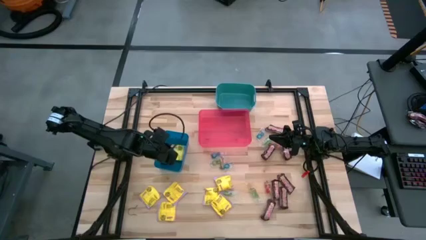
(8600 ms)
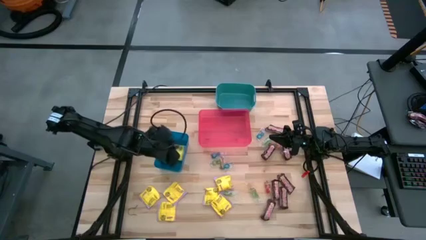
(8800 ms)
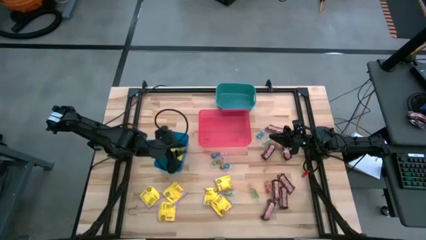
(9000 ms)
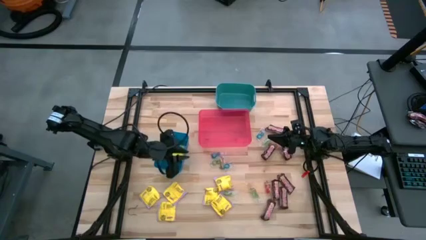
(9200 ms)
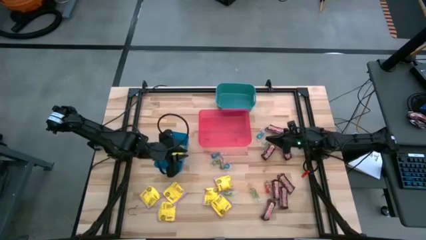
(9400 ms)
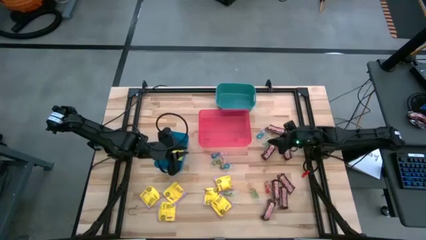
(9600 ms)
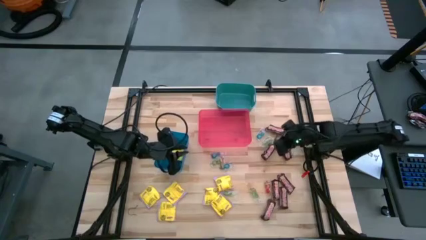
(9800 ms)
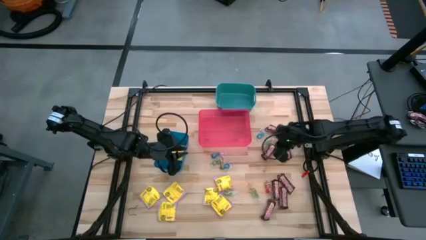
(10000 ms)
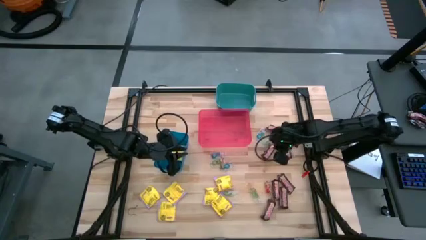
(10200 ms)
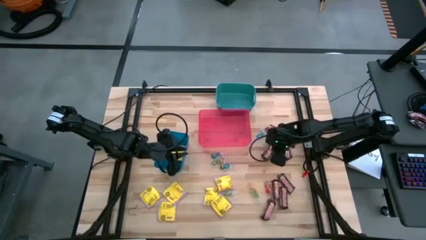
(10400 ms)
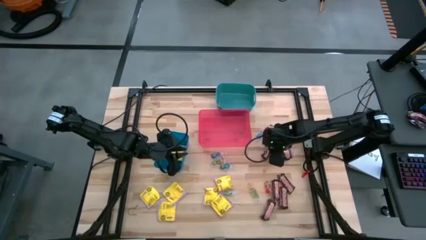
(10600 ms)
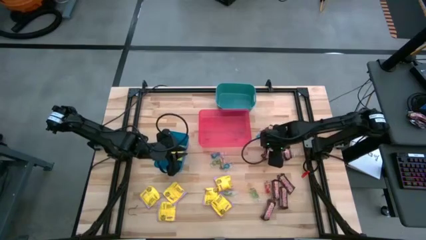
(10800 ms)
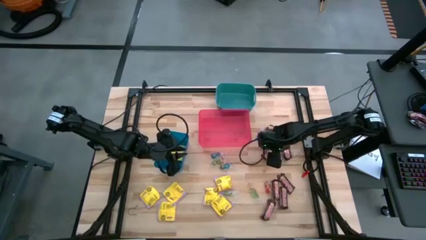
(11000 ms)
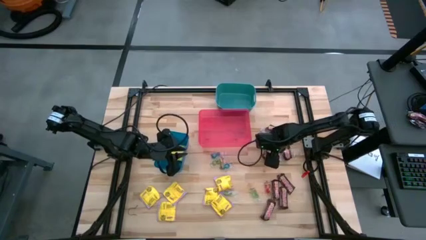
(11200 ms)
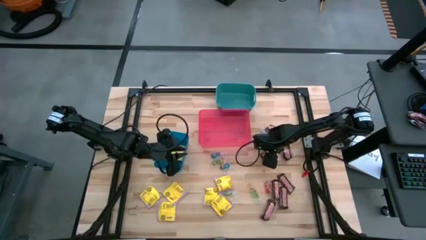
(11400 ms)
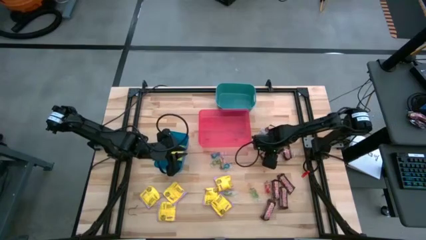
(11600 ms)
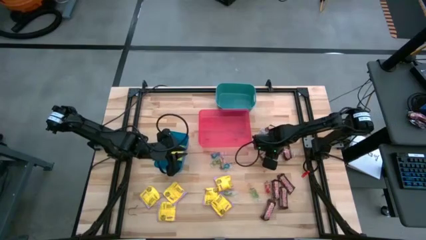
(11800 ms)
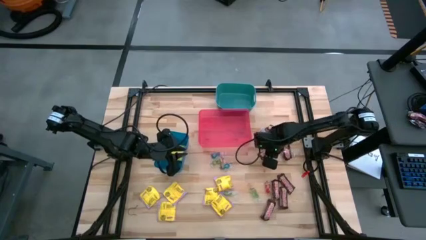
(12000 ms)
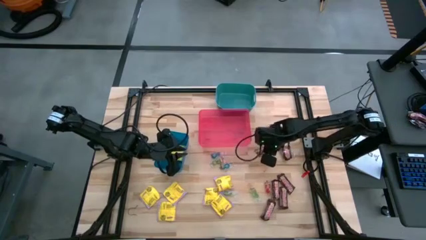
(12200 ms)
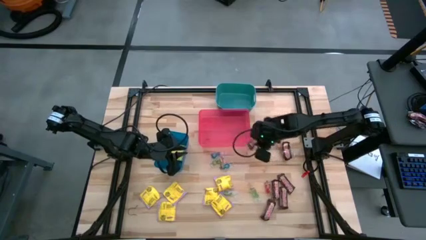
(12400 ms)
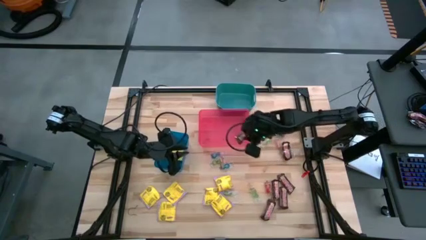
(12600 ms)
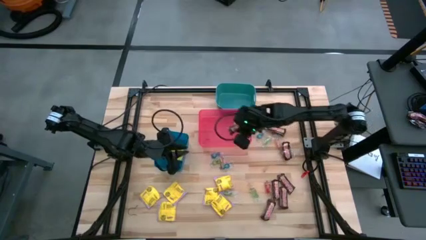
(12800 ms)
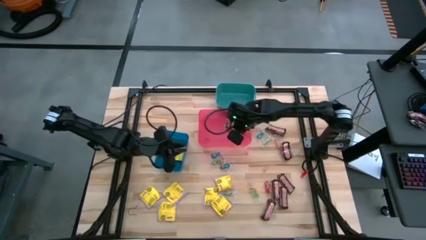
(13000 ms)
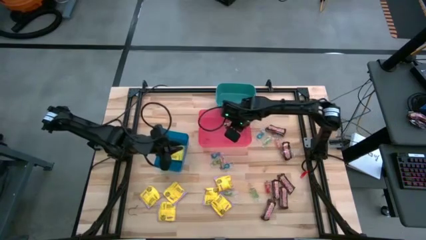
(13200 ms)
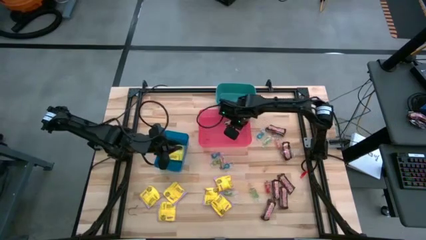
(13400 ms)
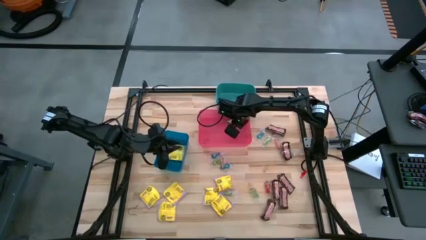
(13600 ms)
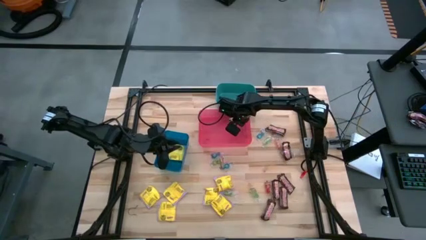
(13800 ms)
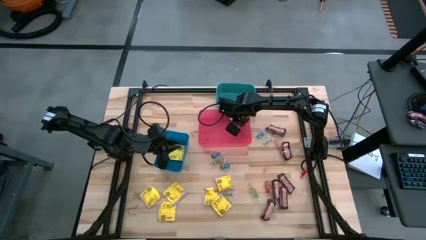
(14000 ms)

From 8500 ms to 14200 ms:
Task: Sort candy
Put the brown chocolate bar into the red bin

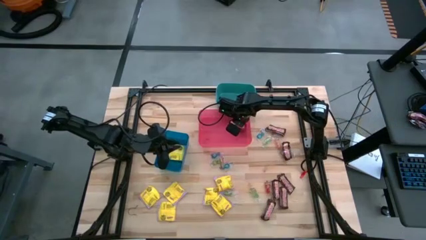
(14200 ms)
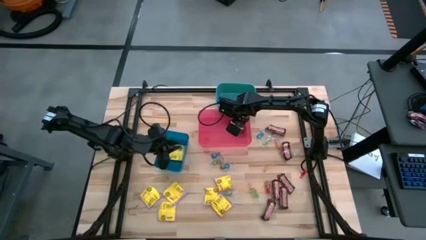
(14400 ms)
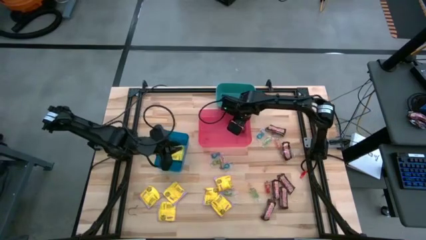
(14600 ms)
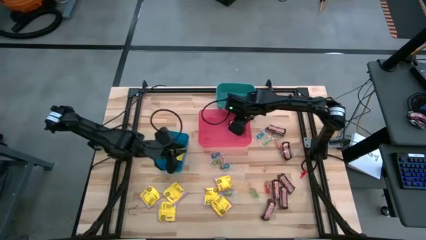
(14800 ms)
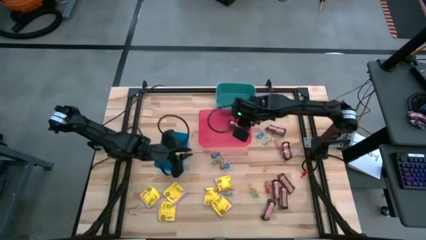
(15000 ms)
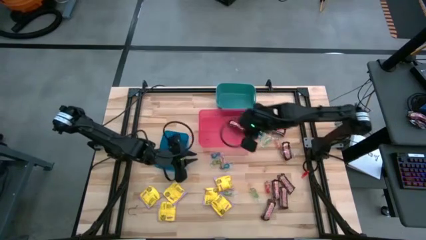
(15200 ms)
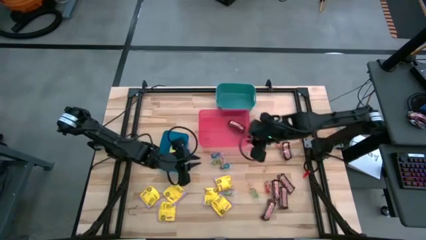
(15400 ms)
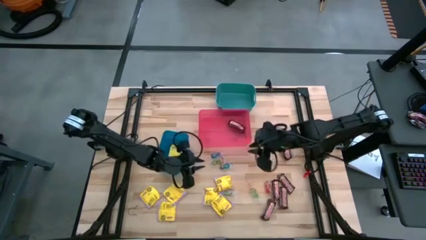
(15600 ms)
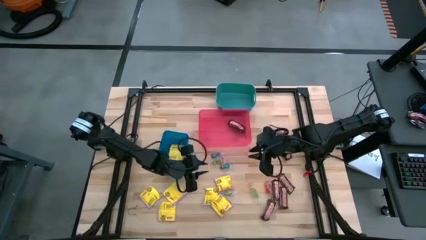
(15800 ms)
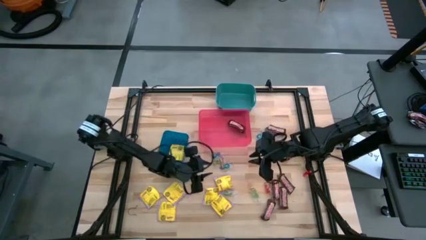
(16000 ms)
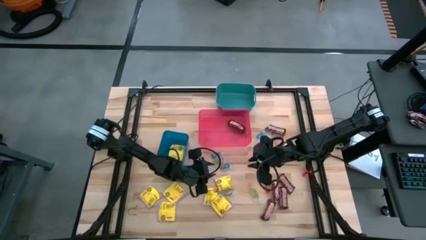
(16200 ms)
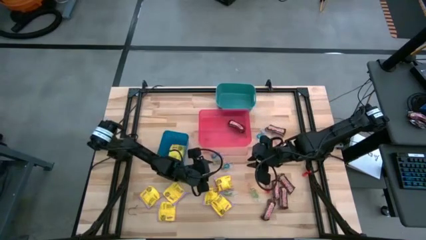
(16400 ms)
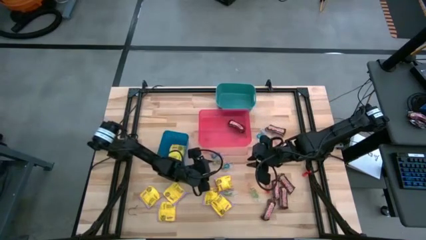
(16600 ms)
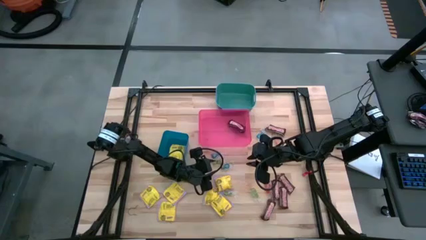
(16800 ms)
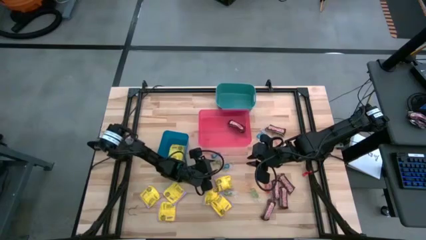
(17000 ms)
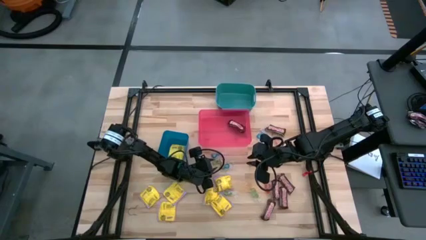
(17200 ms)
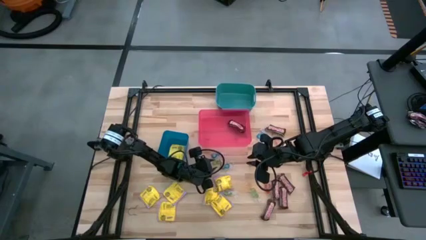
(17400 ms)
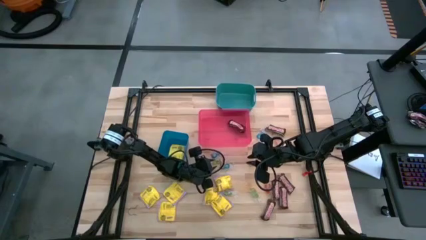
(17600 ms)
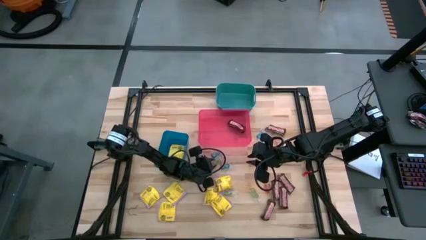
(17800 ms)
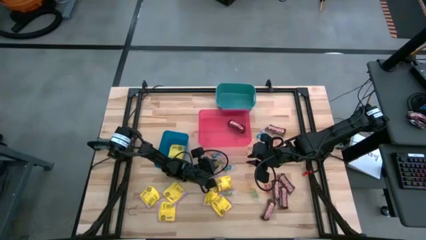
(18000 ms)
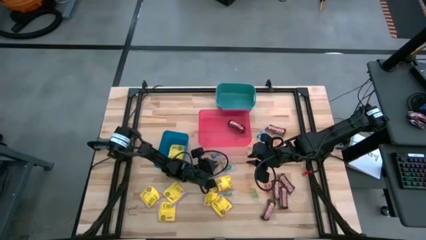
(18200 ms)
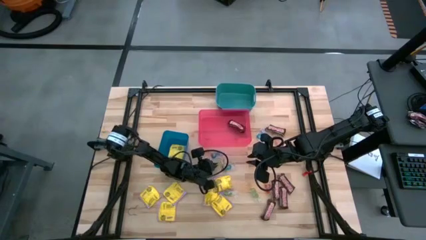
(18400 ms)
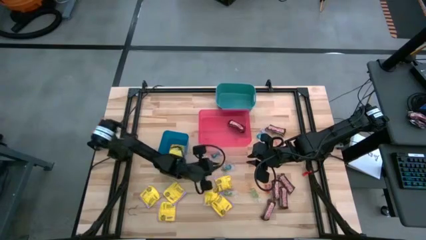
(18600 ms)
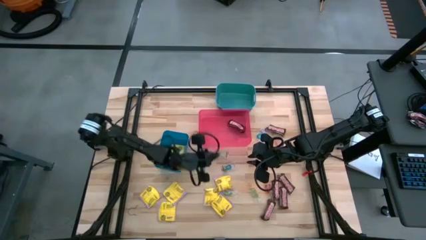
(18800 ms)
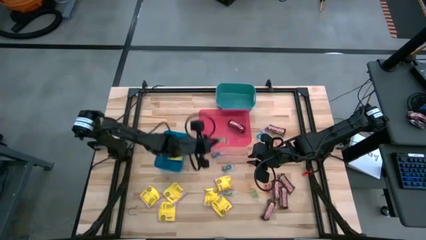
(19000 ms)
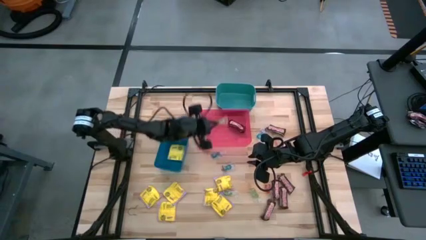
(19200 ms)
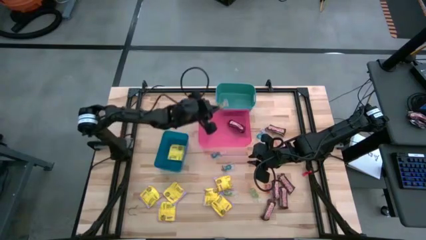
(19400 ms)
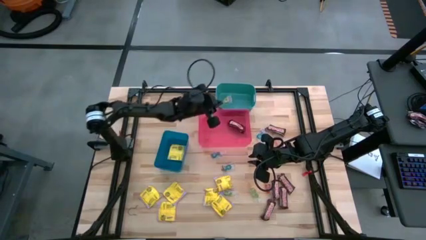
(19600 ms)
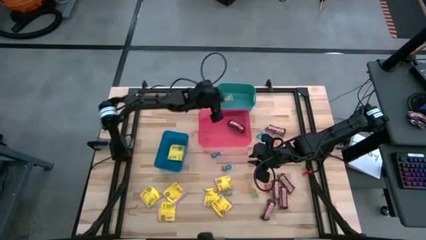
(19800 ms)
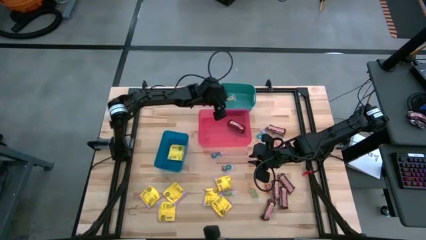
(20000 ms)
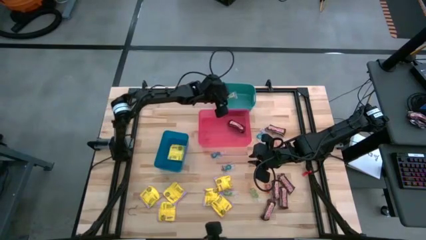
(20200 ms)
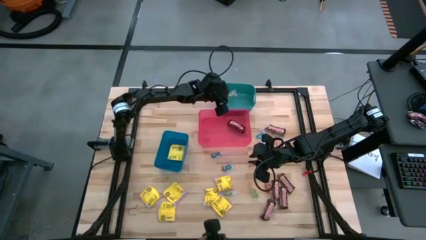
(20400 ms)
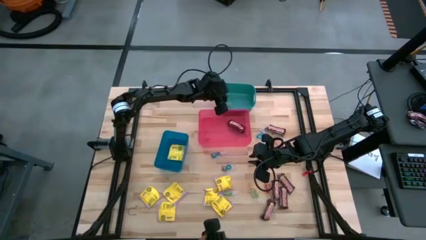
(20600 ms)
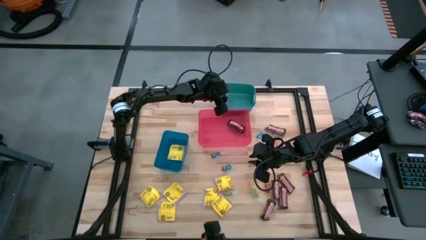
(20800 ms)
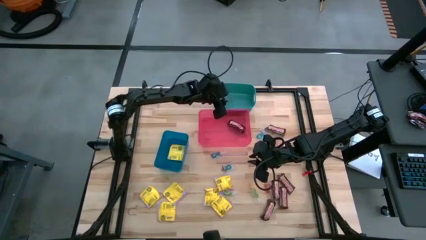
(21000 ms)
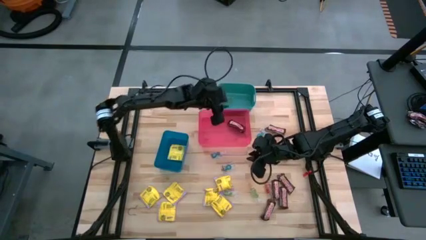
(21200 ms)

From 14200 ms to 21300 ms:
Put the green gummy into the green bin

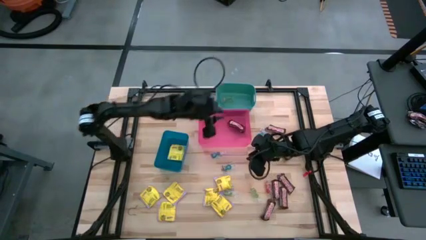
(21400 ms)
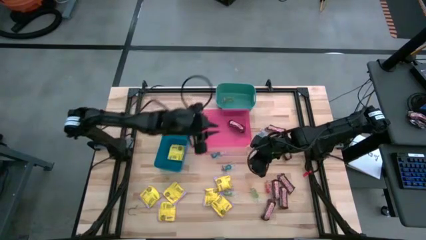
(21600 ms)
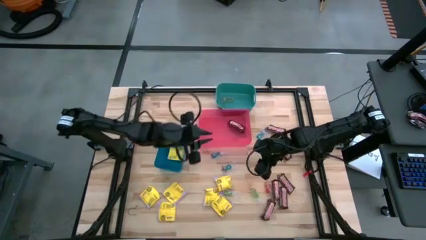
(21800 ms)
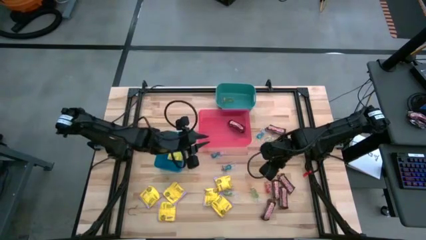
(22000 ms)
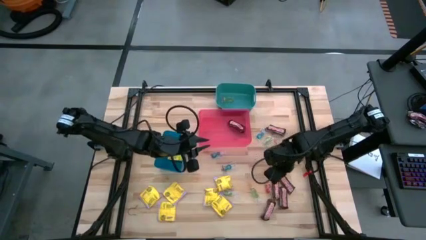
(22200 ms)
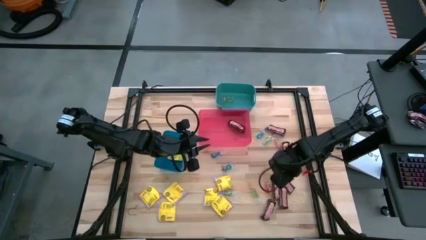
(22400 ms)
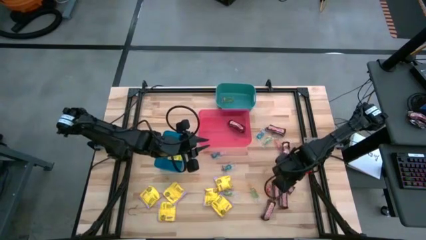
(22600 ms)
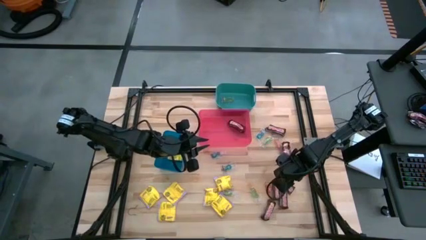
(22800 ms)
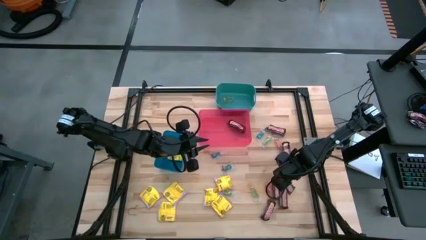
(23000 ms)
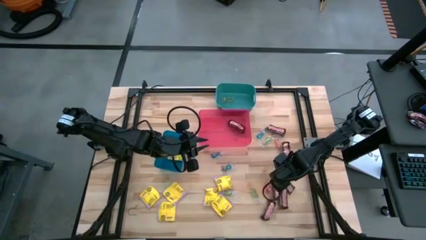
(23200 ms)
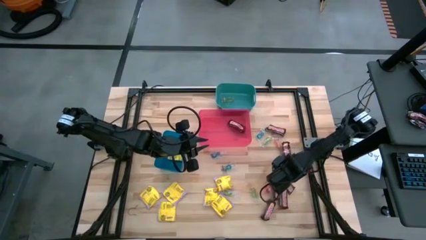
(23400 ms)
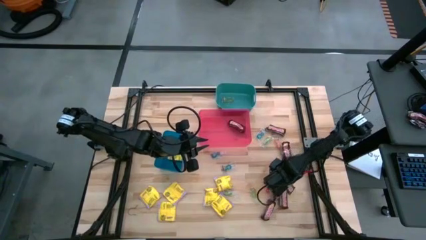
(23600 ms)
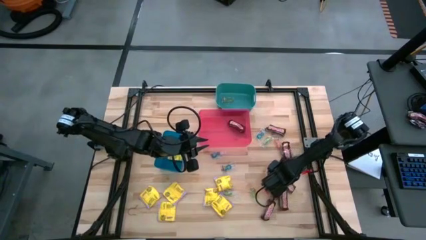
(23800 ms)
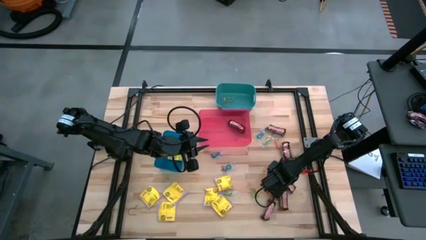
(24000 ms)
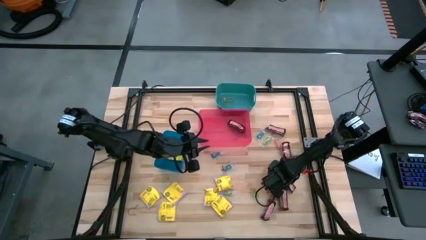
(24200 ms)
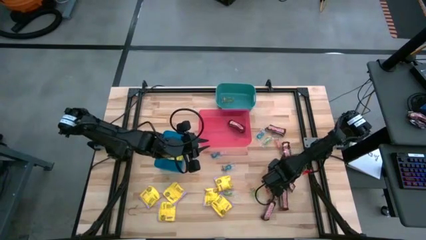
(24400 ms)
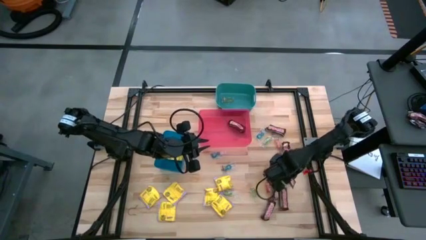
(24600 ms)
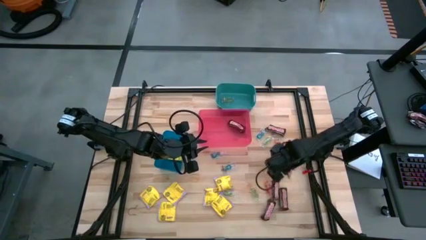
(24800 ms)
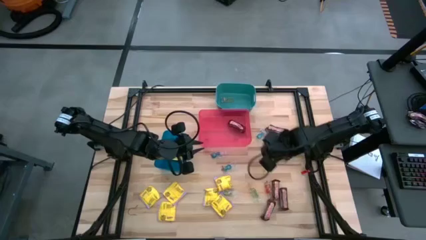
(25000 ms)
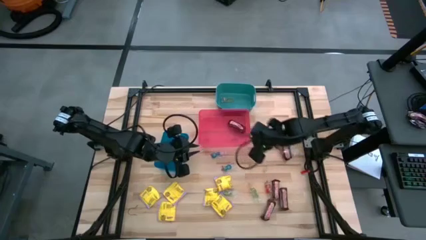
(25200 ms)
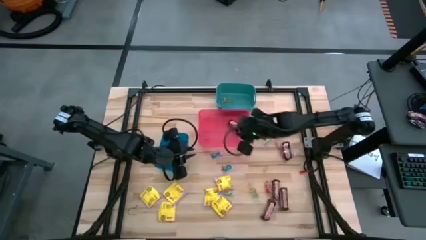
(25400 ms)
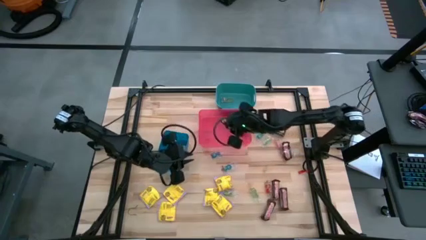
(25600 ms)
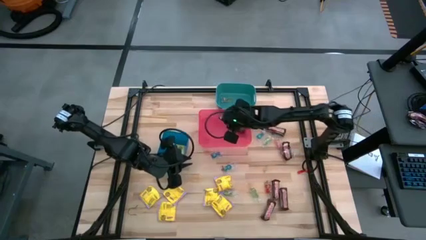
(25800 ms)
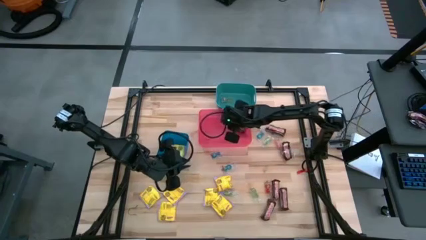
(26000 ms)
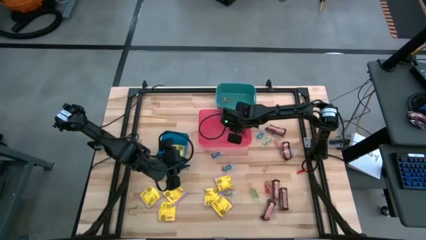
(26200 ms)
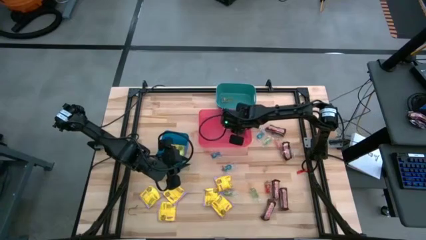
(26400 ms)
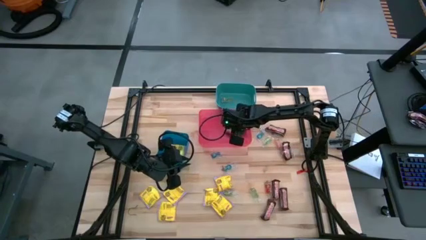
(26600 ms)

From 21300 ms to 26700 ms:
Put the brown chocolate bar into the red bin
